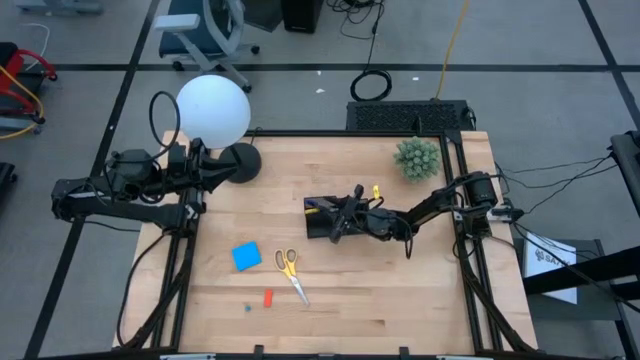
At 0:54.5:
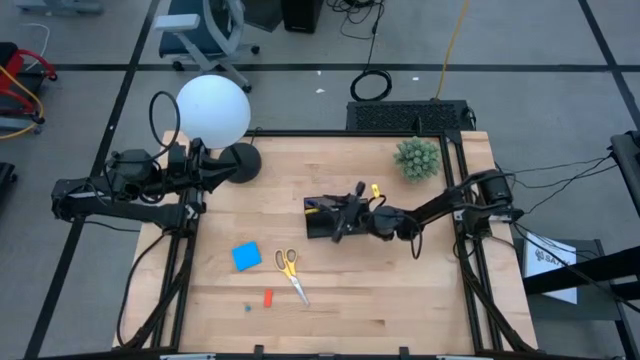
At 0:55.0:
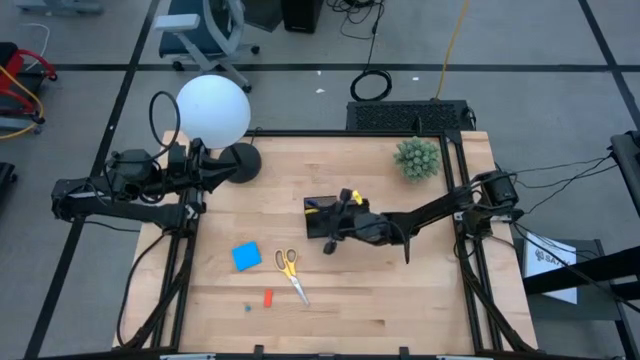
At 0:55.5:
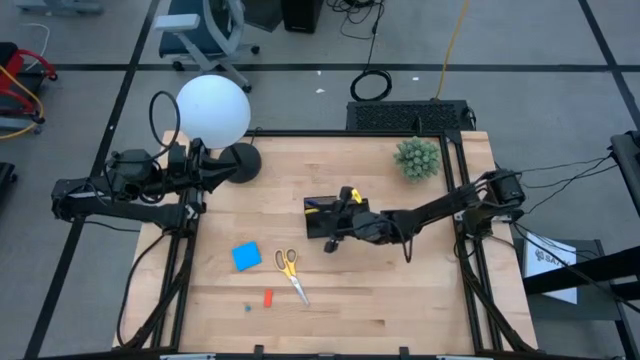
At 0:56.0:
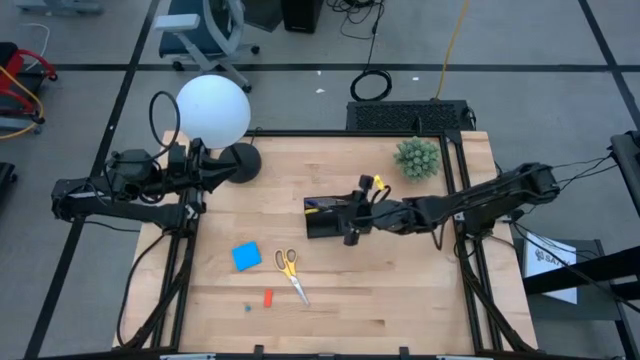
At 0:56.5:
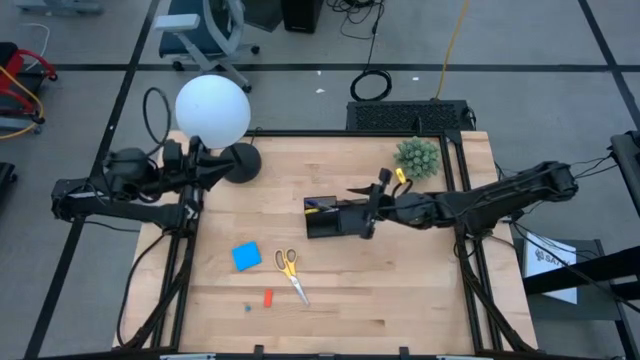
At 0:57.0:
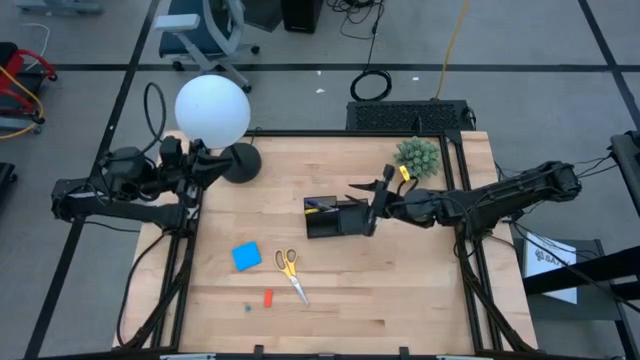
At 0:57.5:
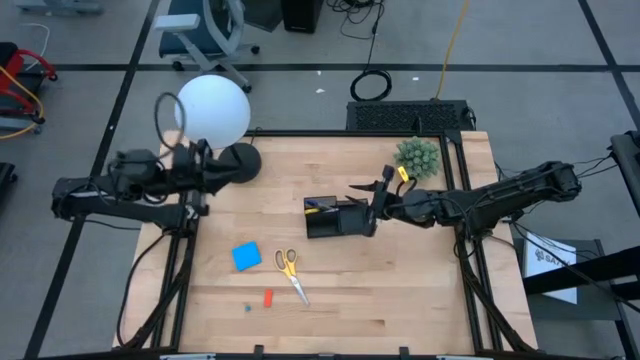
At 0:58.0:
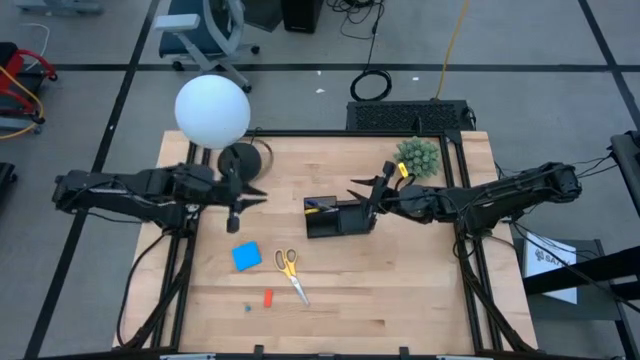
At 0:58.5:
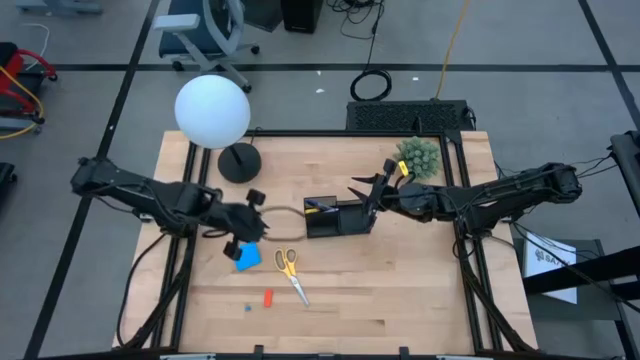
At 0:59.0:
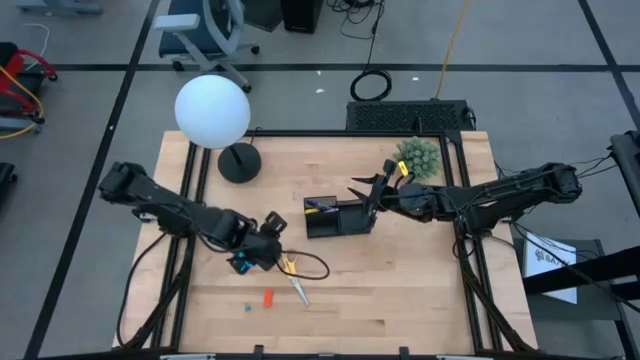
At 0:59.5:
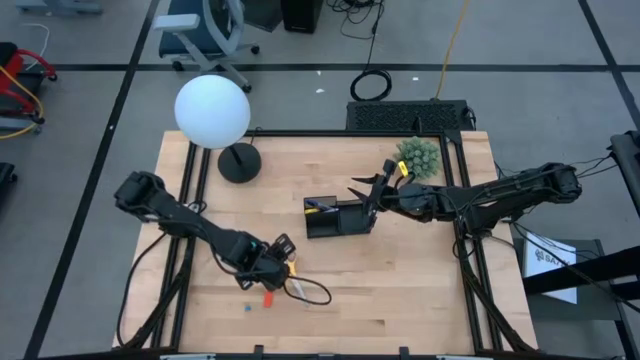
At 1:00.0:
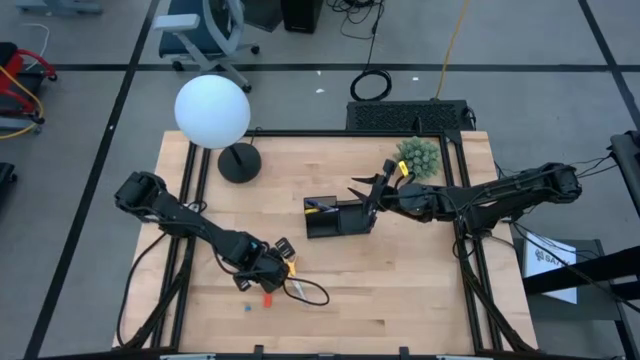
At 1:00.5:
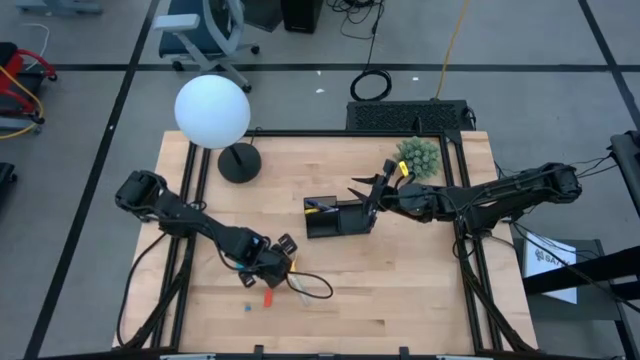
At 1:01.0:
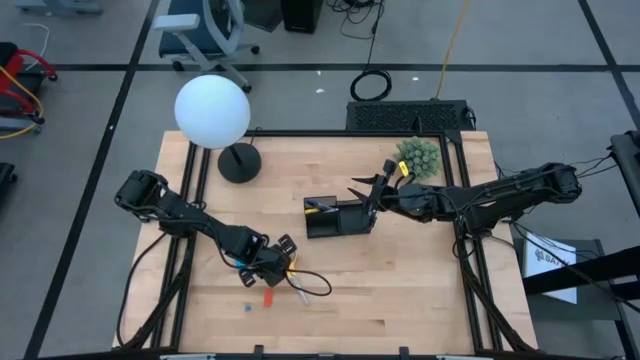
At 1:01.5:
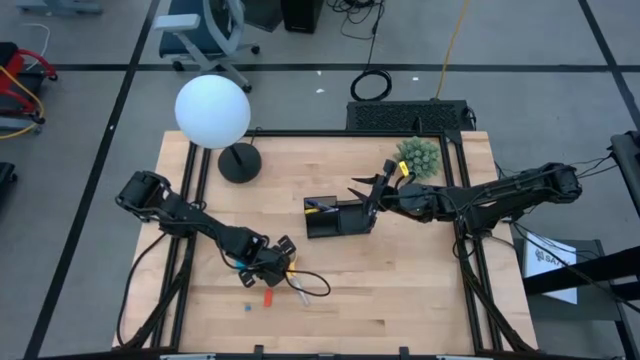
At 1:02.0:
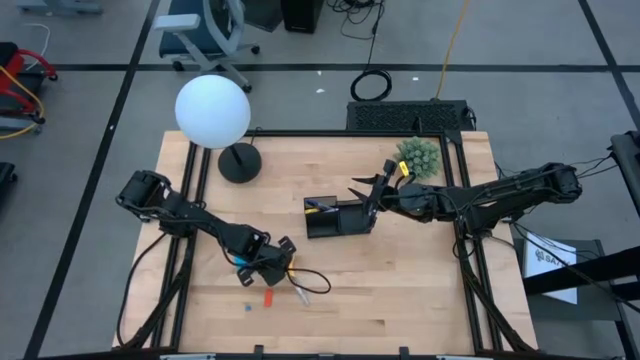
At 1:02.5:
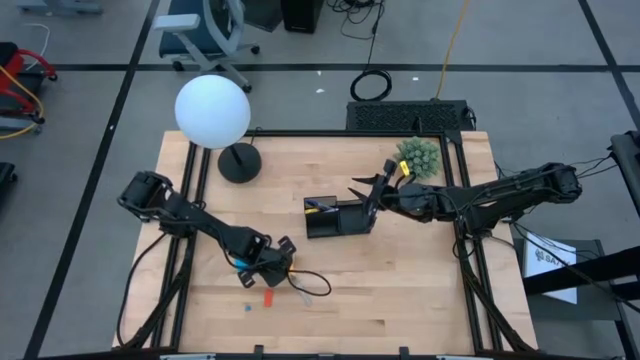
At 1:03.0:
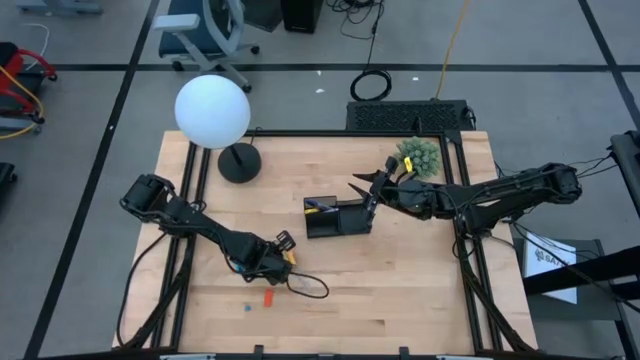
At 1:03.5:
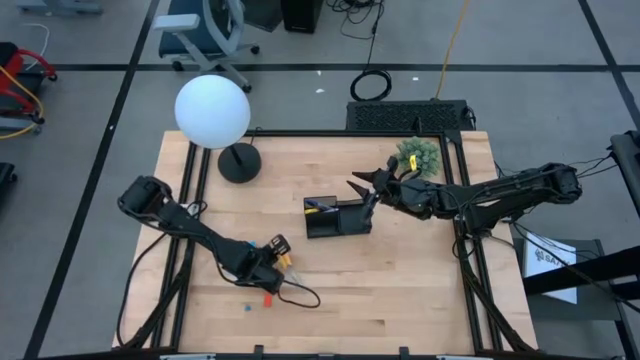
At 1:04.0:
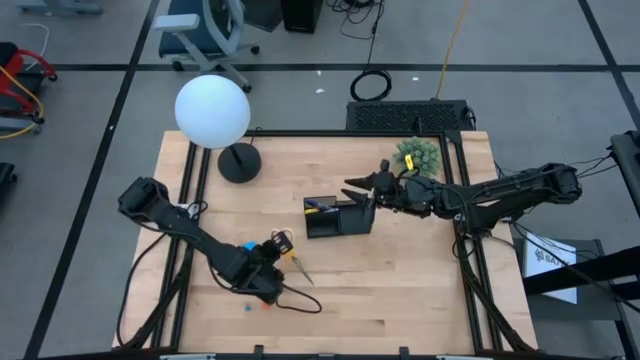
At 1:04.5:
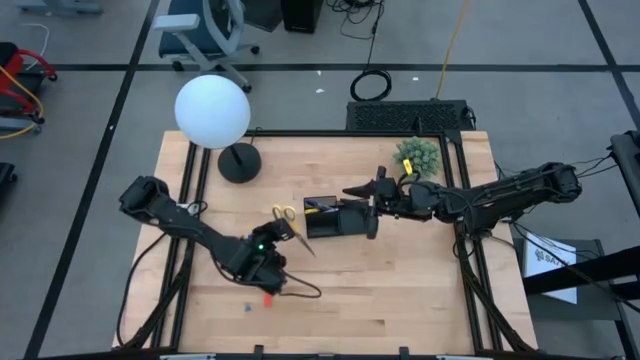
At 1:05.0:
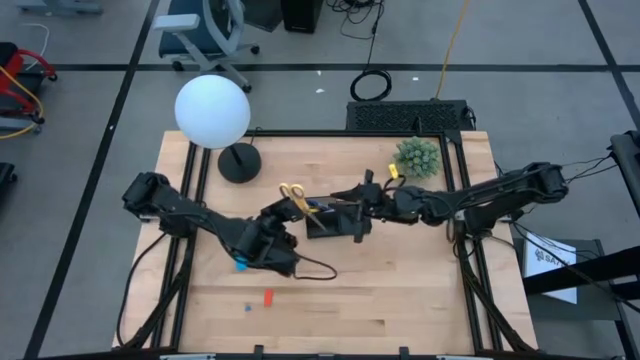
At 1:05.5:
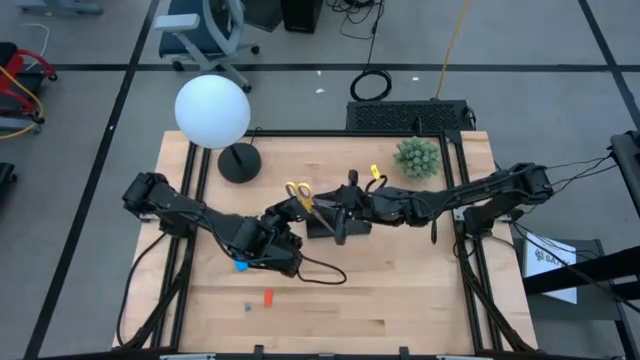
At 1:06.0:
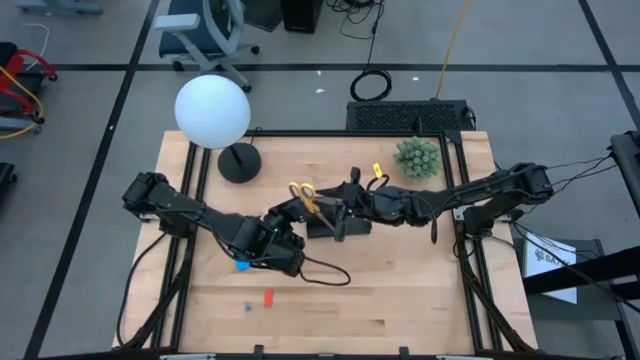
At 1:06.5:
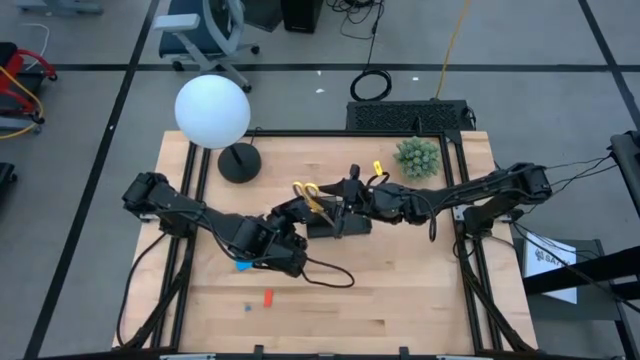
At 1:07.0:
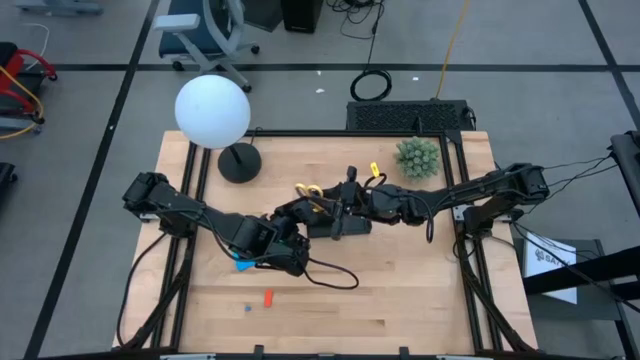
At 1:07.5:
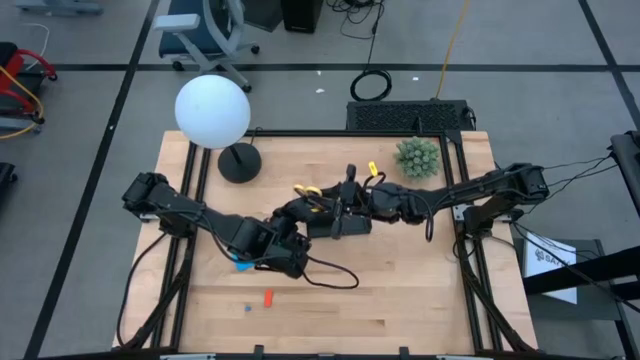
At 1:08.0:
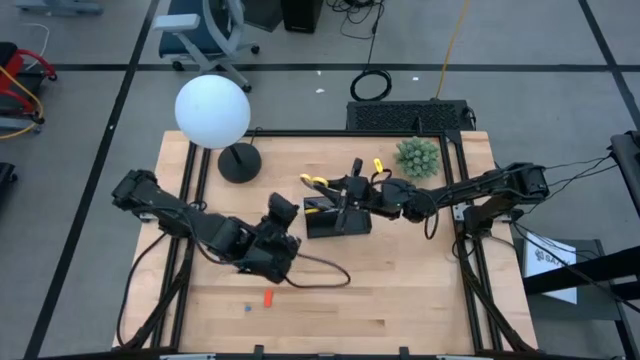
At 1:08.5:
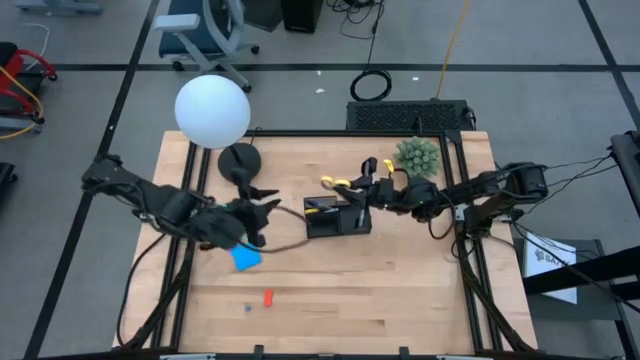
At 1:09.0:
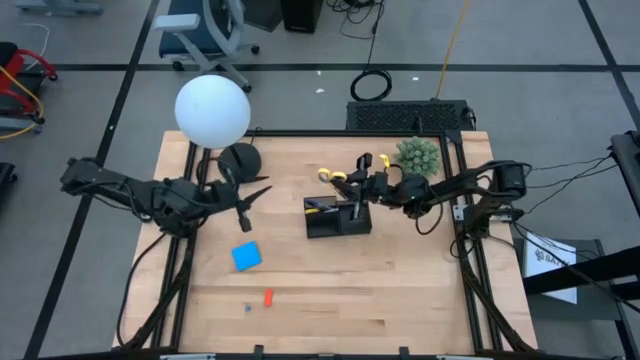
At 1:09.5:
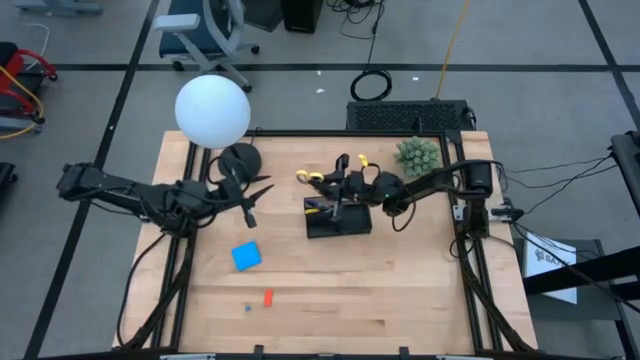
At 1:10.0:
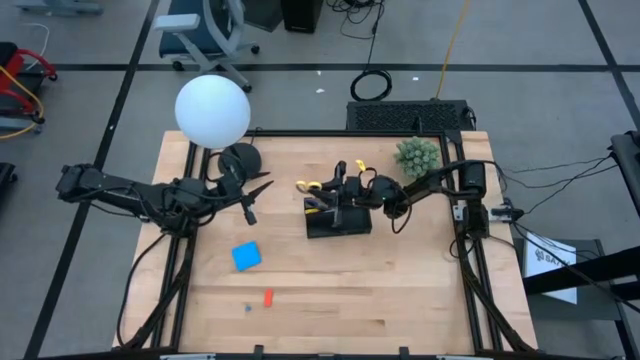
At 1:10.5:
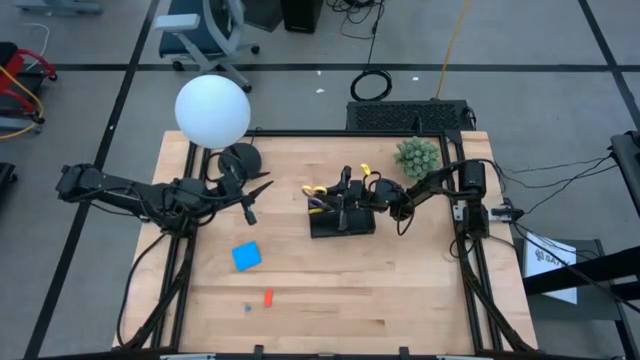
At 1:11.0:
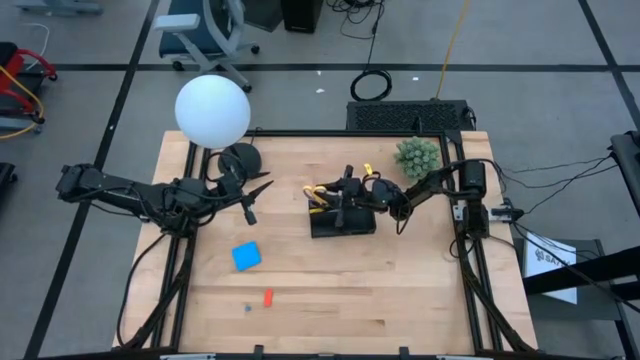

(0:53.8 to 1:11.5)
Task: Pick and place office supplies into organizer
Put the yellow scissors into the top left compartment of the black desk organizer

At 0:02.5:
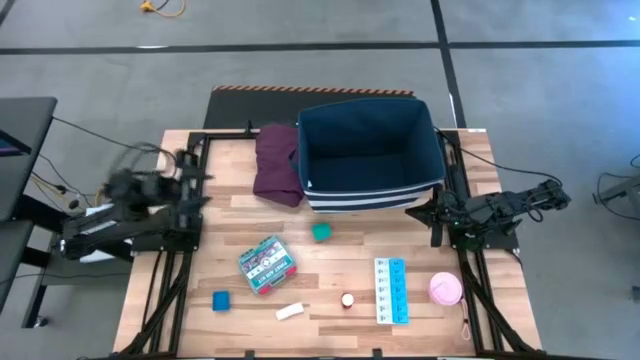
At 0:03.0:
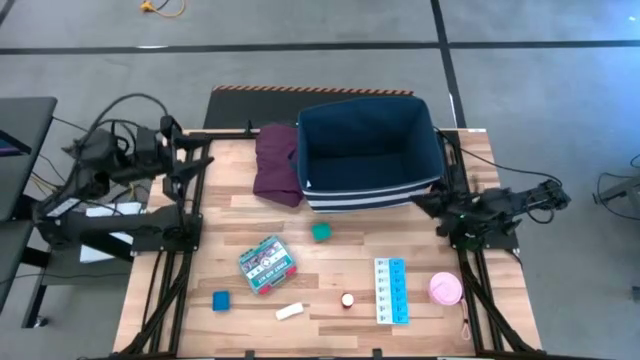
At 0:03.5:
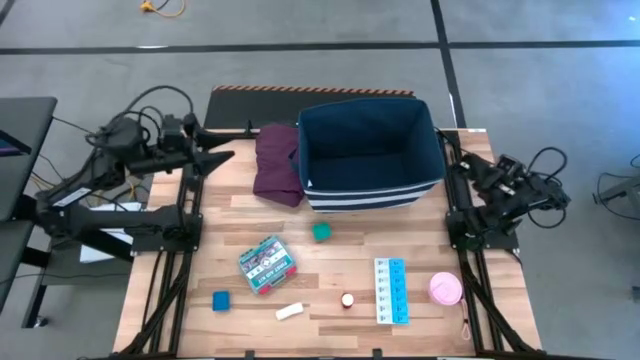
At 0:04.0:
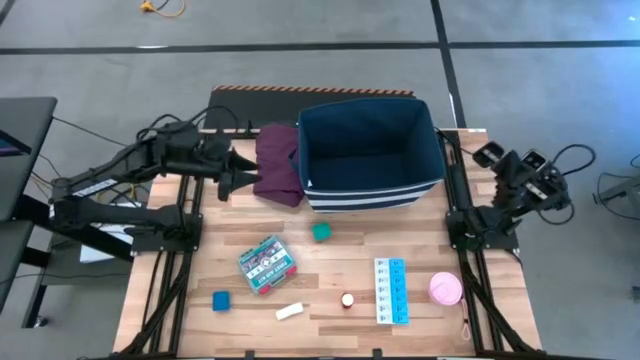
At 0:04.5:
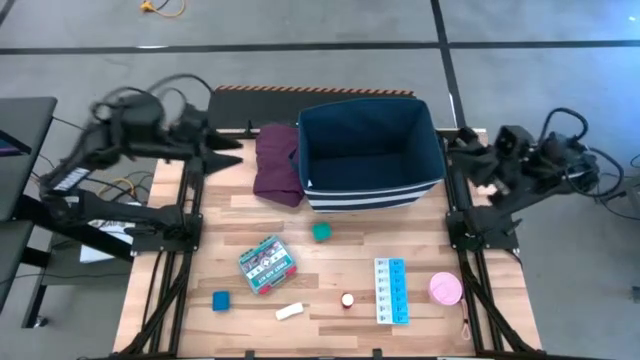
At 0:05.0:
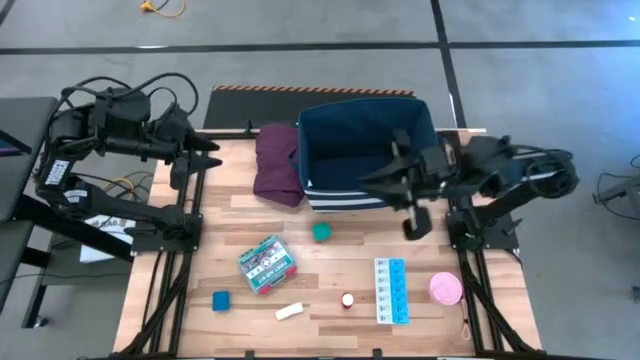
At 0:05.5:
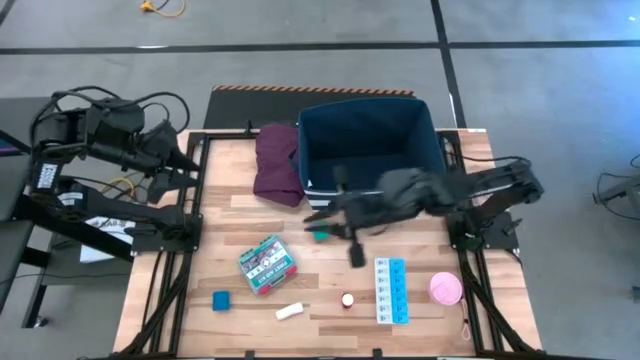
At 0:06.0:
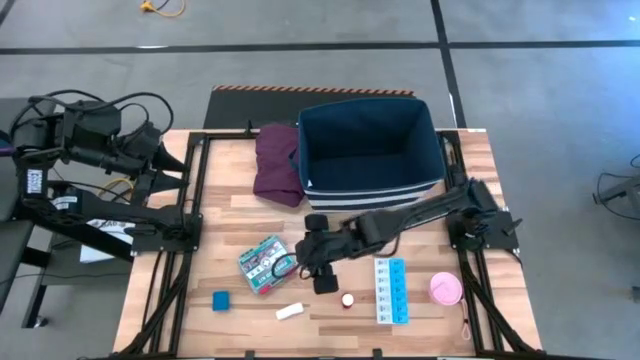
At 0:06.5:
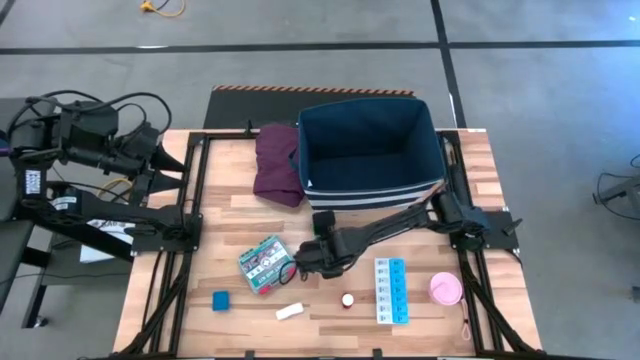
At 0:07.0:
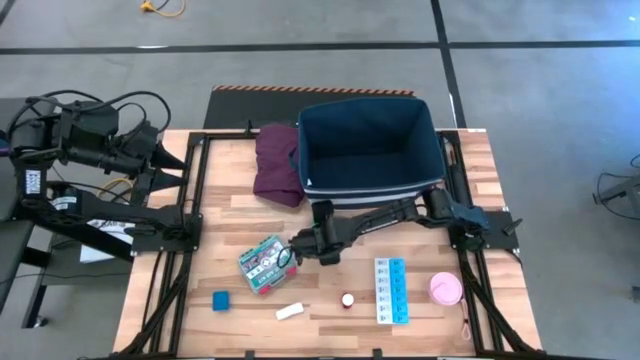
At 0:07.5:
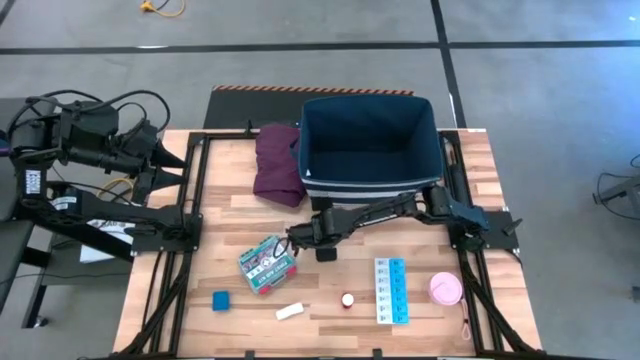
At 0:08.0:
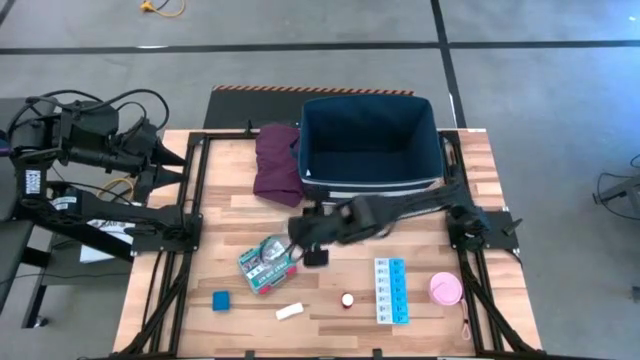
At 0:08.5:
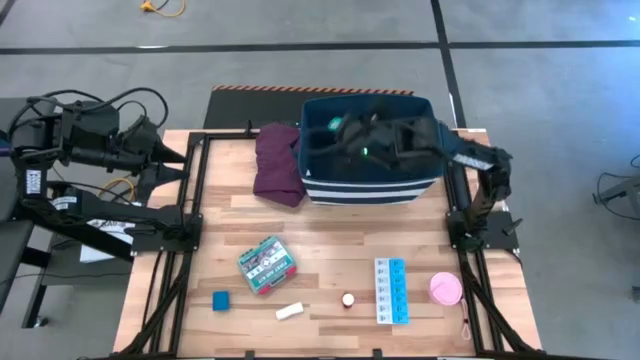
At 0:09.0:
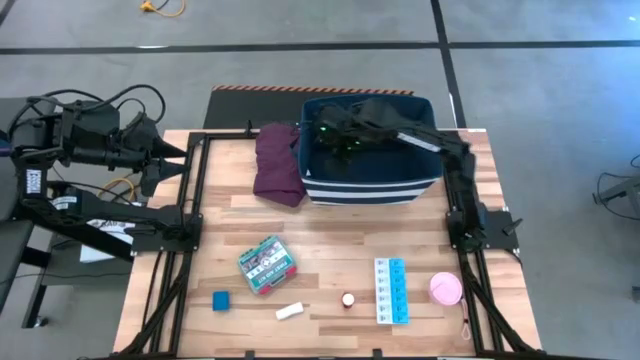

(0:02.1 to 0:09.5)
Task: Pick & place medical supplies in basket/bin
Put the green bandage into the blue organizer
